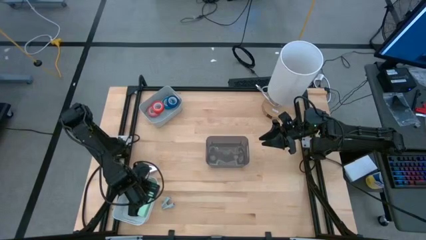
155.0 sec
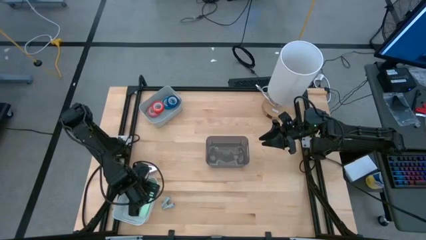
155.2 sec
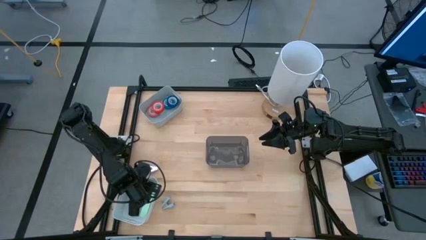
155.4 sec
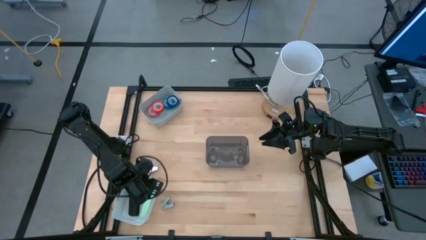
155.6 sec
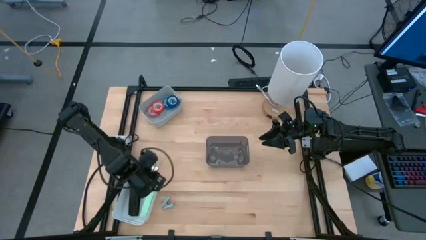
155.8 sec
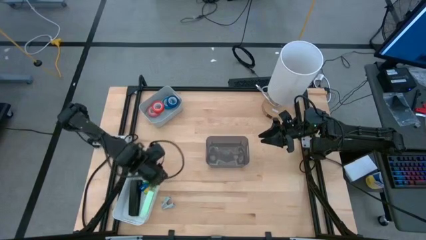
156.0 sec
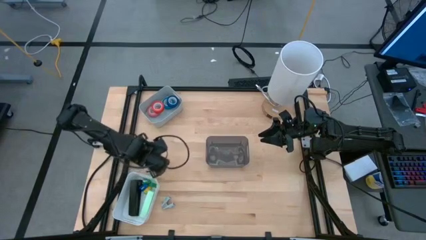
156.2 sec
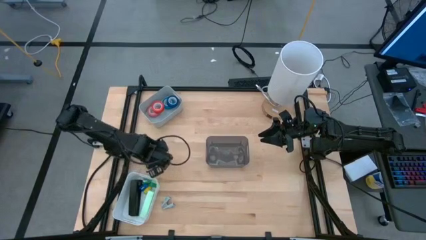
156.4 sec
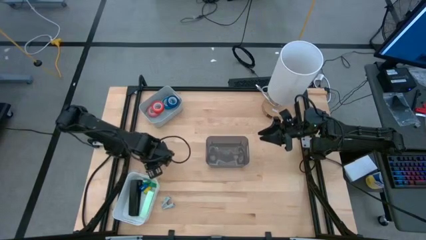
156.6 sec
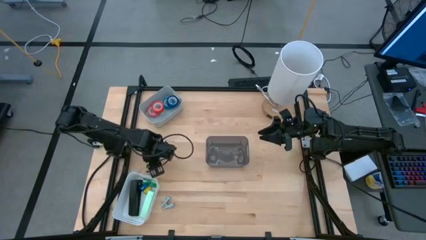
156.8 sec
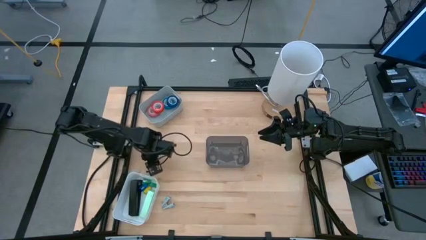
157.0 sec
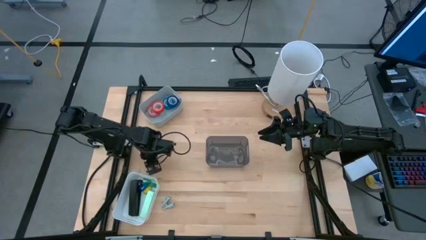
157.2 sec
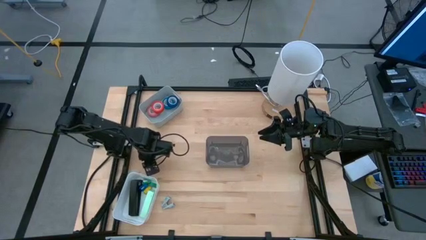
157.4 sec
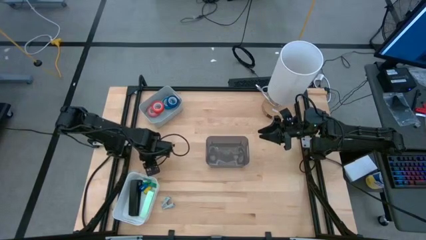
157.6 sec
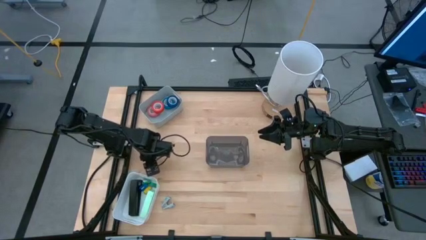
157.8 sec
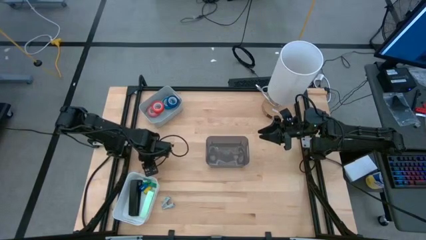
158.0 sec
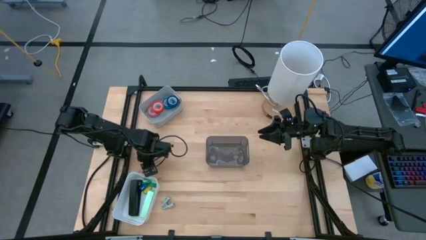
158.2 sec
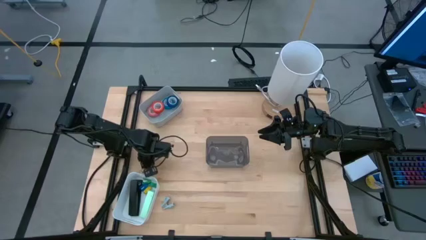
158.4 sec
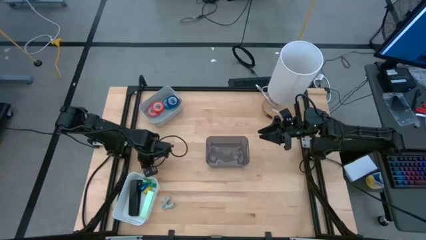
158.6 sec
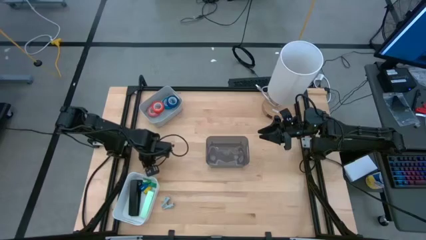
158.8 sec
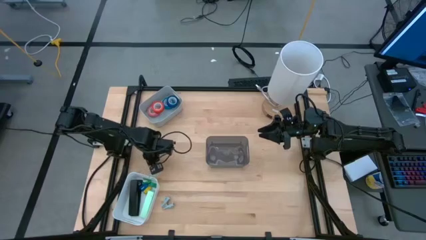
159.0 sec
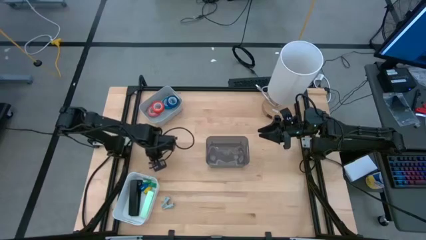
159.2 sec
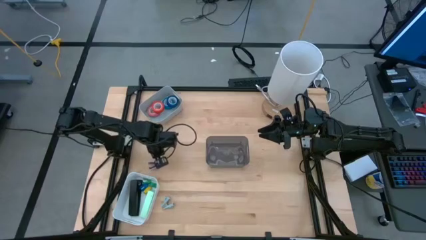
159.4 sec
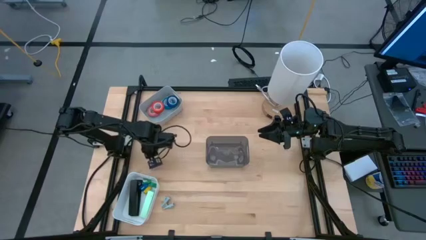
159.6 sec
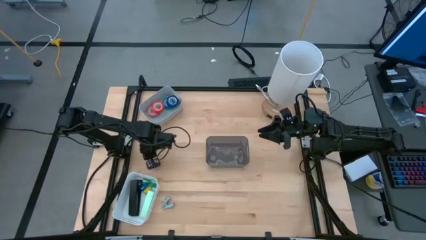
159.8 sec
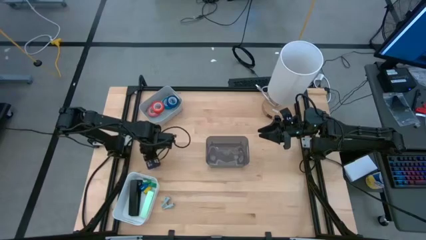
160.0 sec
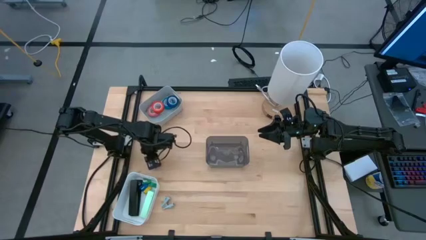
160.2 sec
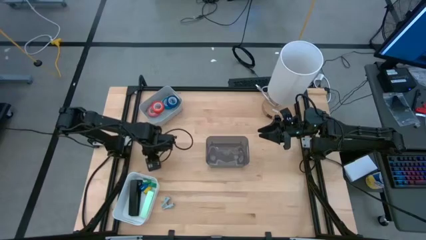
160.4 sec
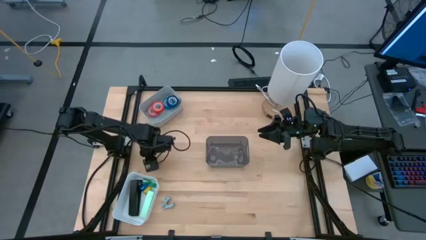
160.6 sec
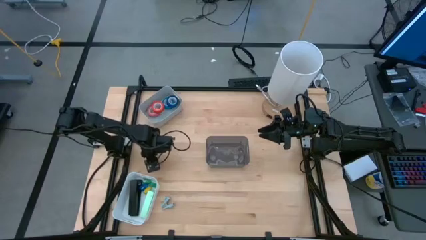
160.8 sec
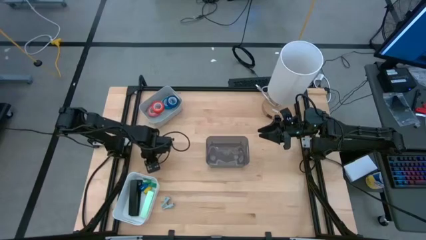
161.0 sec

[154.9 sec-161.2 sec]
Task: Pick and place Stapler, Stapler remover, tape
Put the violet stapler remover into the black bin

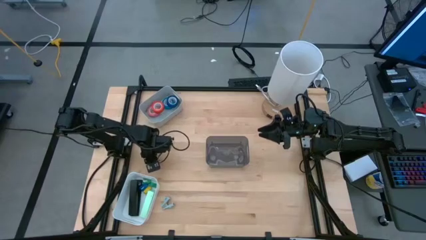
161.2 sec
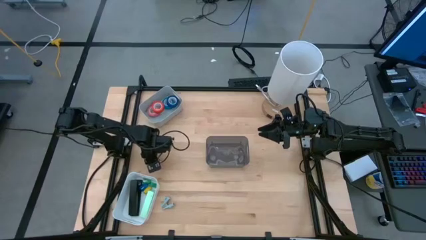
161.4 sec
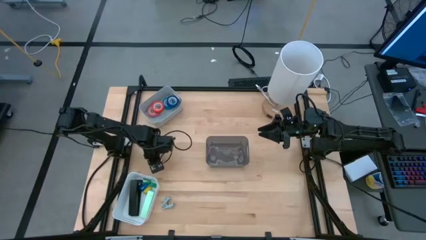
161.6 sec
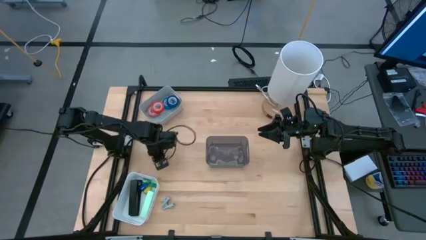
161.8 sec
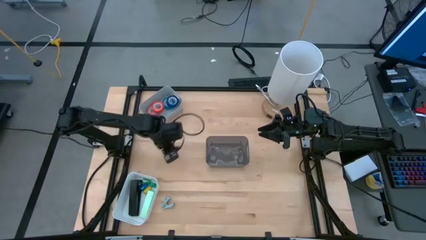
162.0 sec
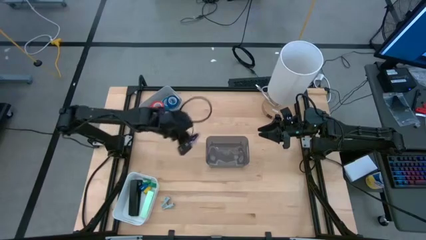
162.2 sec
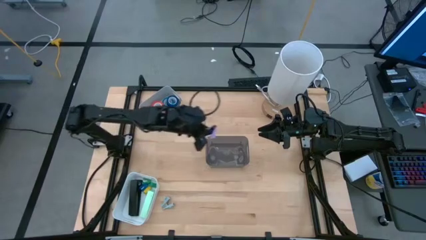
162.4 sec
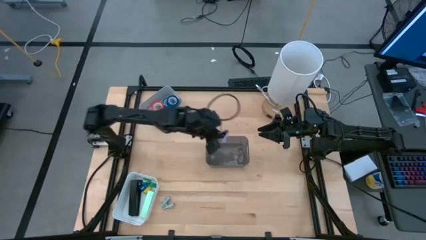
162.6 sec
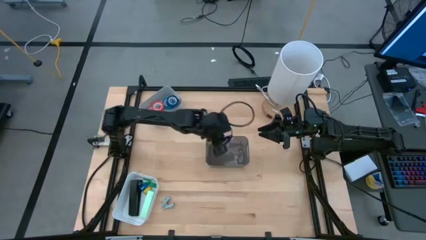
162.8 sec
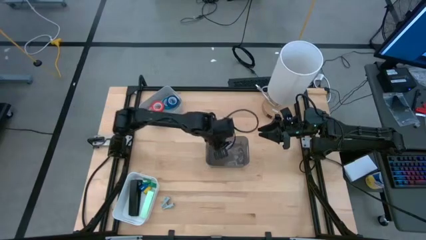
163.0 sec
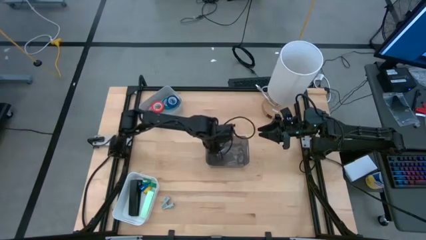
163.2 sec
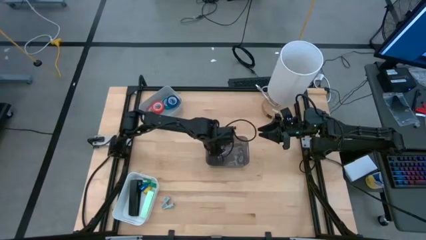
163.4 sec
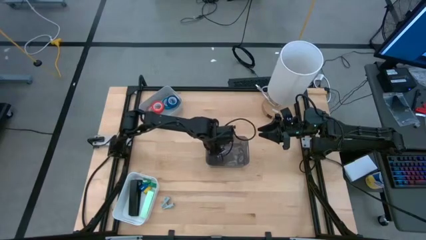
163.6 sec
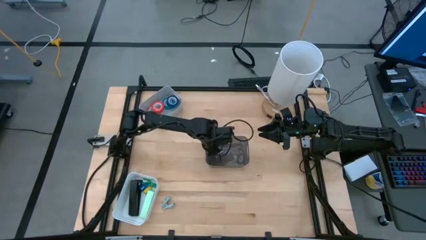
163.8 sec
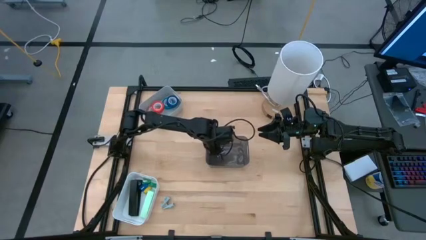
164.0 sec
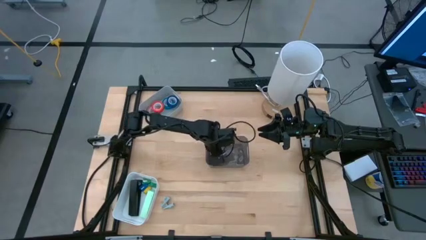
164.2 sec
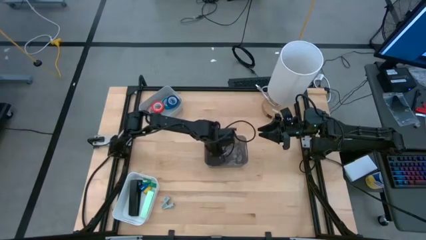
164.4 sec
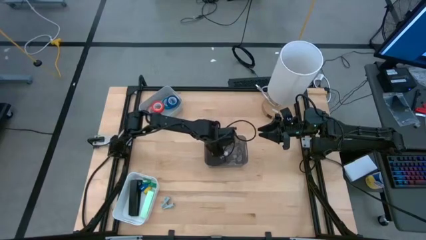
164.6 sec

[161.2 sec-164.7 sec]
Put the violet stapler remover into the black bin

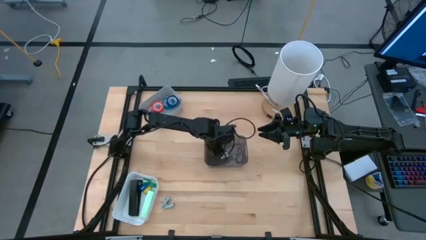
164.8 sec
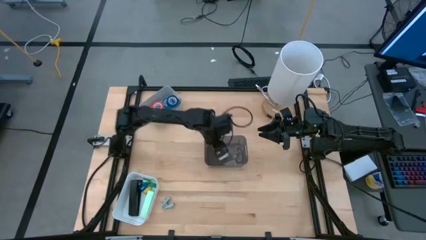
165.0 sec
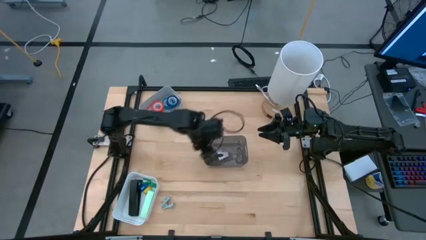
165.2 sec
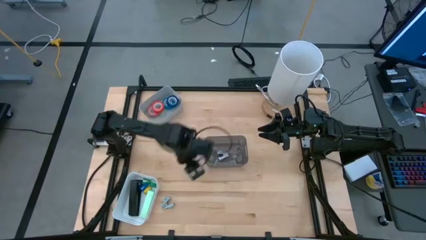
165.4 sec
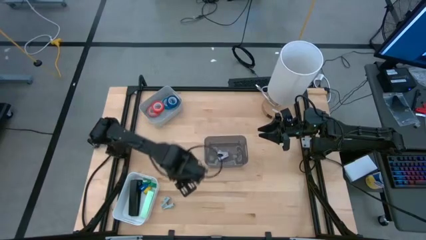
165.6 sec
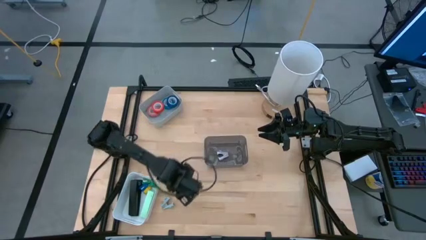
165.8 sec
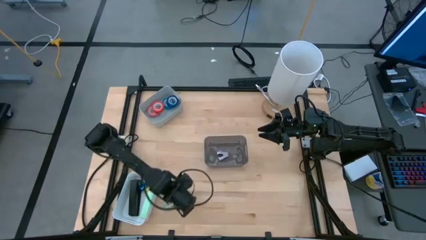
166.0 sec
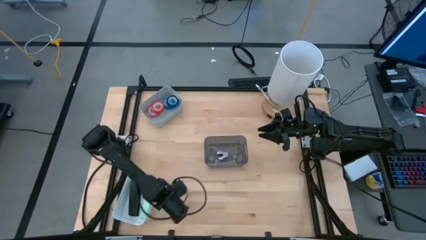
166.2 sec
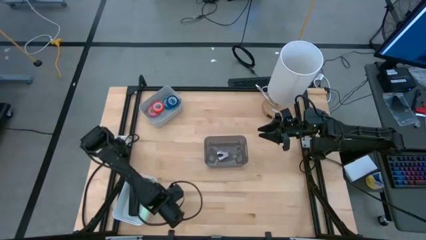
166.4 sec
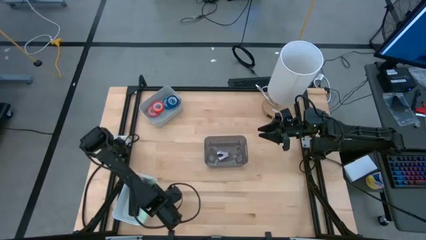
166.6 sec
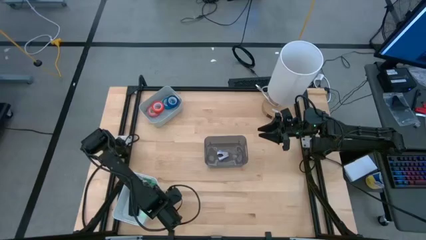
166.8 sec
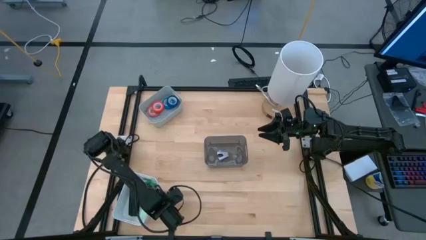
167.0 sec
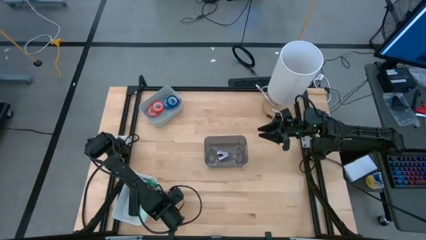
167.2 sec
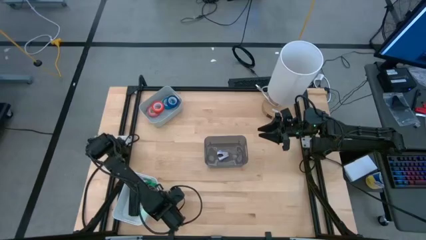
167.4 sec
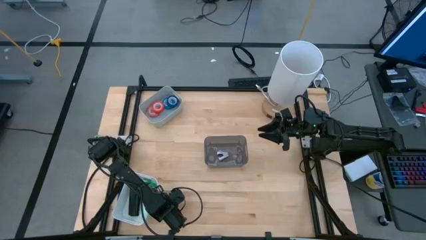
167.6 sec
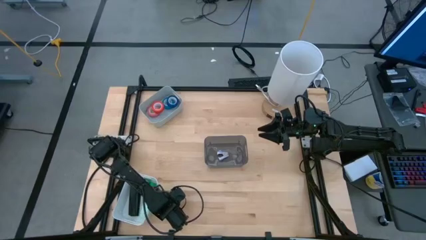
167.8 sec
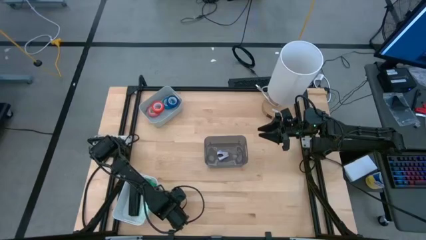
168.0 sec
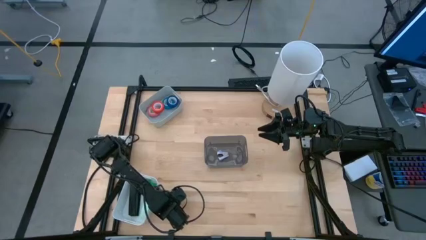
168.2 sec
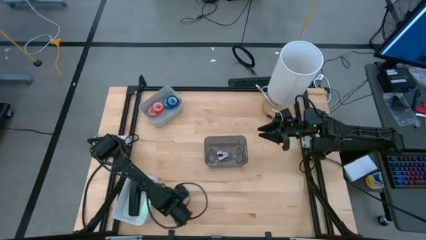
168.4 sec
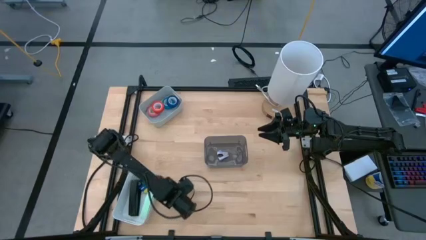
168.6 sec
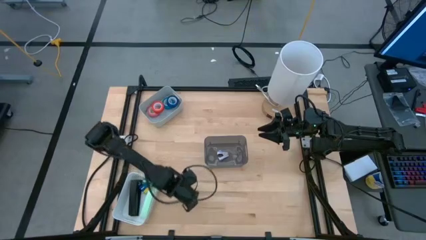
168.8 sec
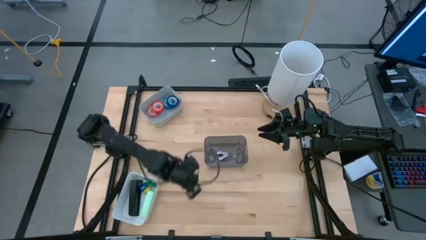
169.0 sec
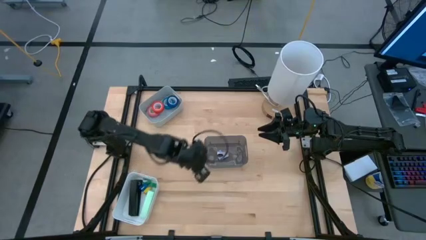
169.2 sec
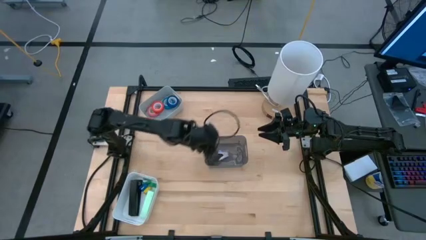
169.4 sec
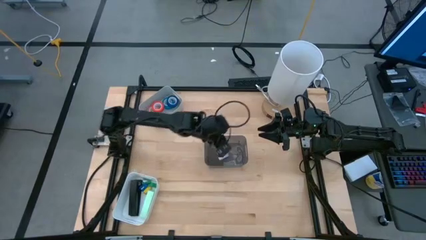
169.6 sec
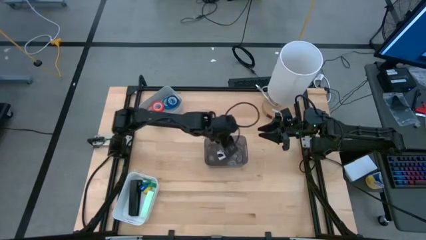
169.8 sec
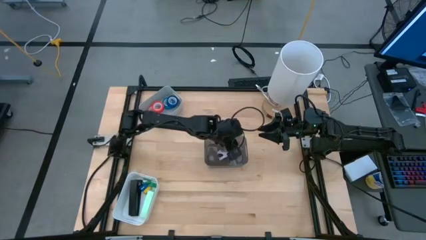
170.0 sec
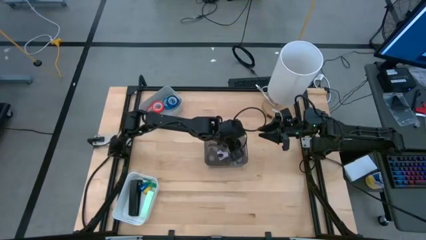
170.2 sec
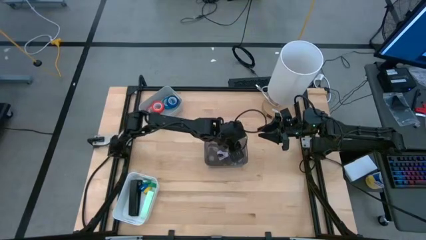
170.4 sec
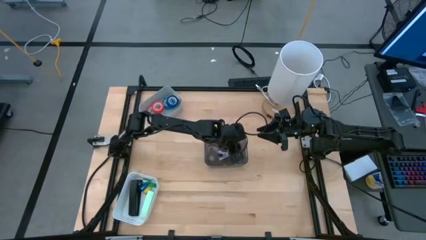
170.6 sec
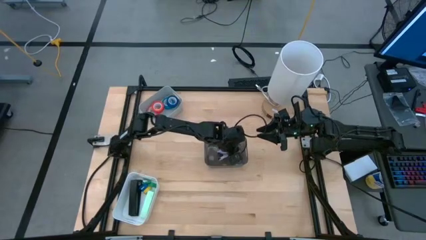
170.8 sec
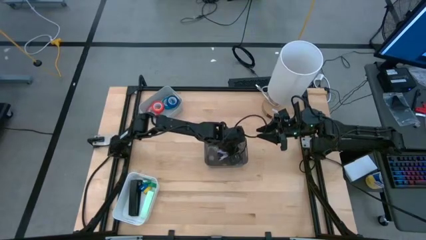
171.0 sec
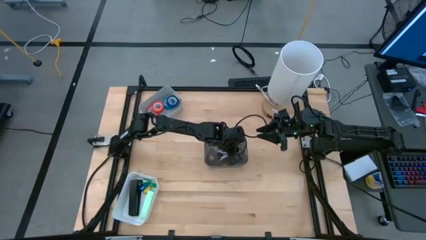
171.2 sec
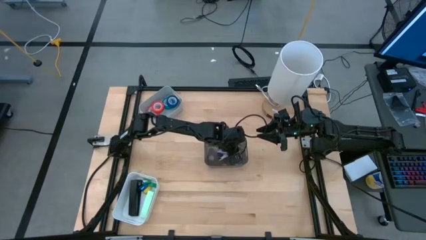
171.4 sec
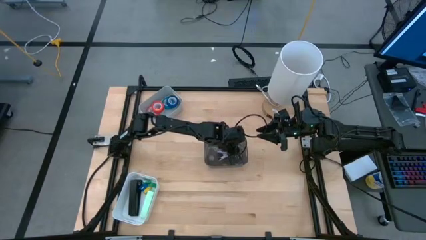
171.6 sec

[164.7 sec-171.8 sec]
Put the light blue stapler remover into the black bin
